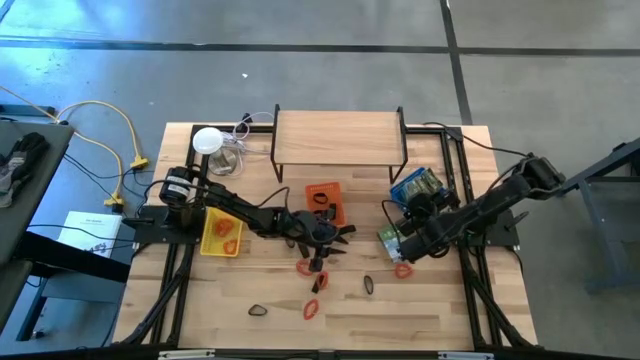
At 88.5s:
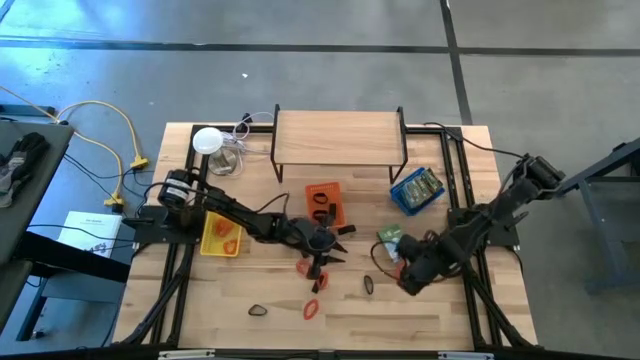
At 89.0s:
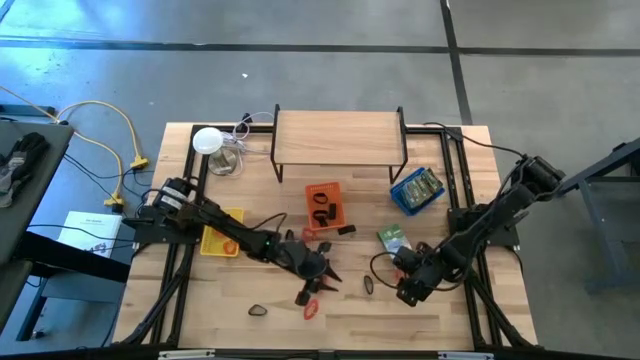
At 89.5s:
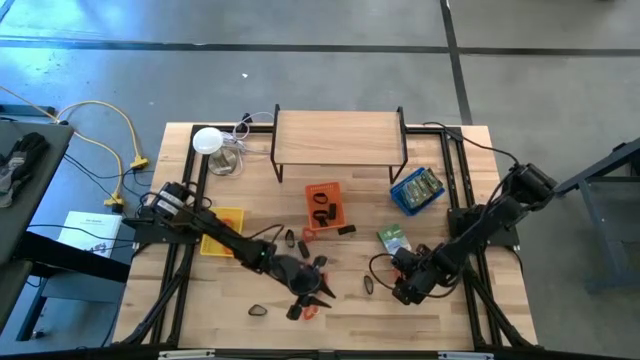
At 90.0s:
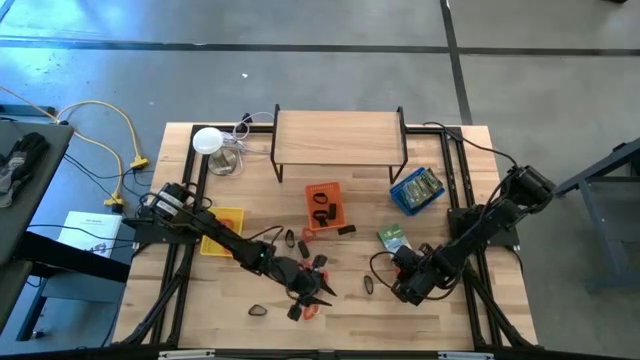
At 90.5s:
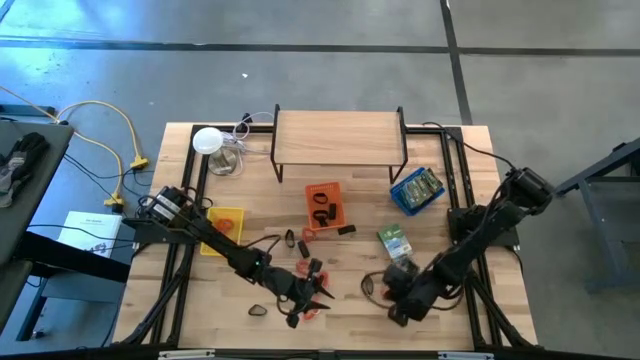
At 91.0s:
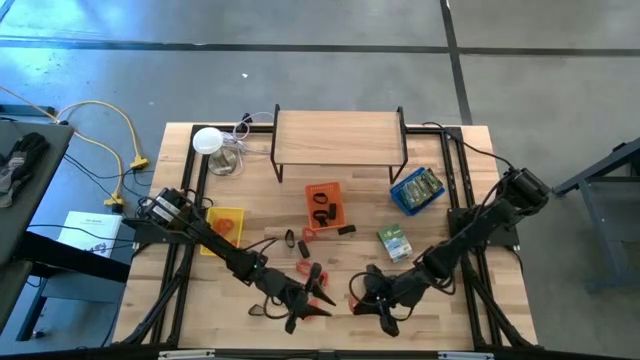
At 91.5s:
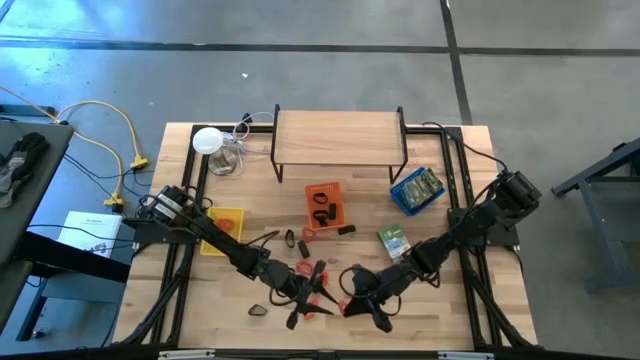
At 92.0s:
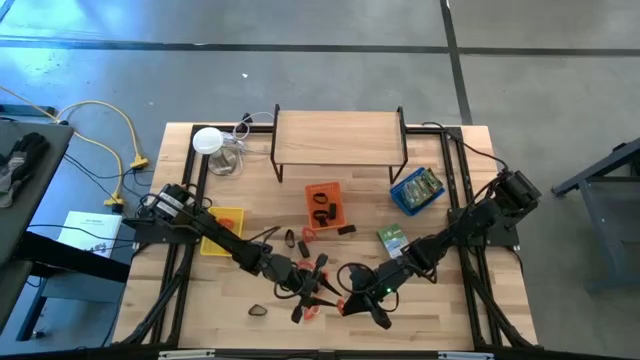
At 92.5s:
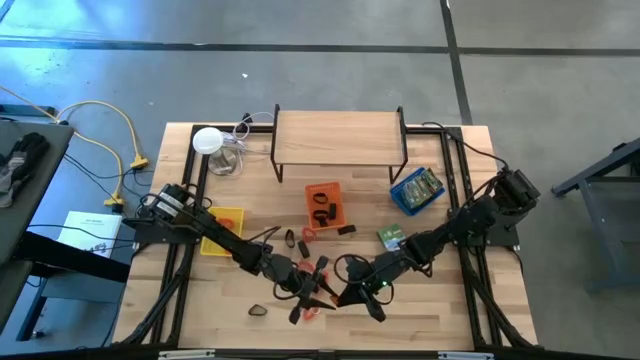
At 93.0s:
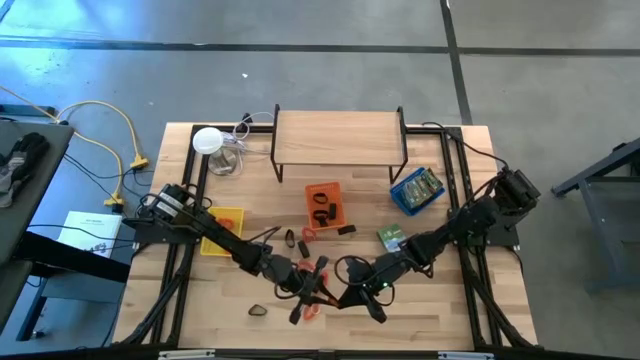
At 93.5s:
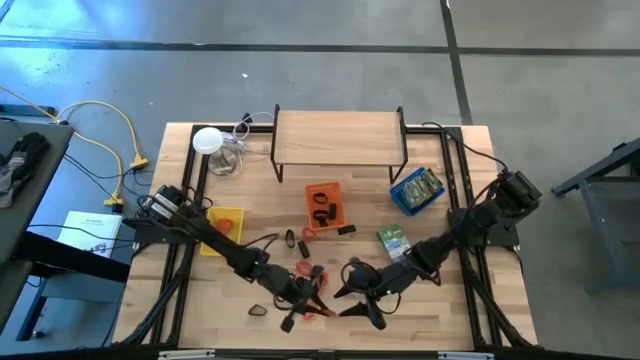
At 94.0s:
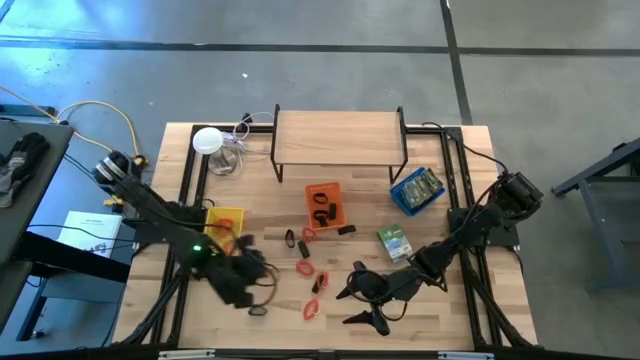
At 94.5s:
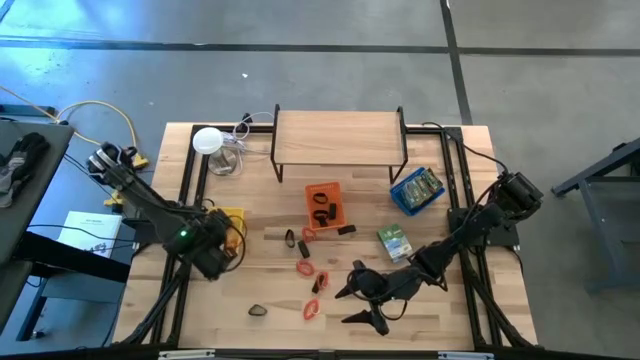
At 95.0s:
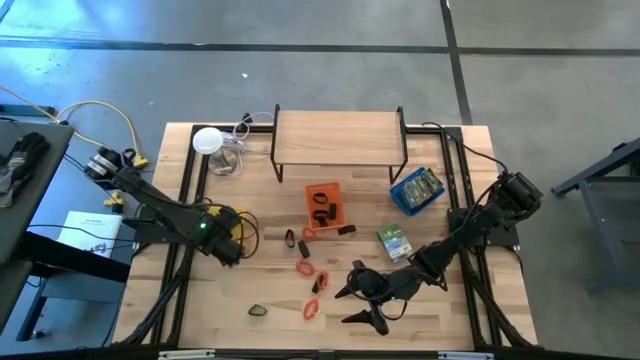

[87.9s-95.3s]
Task: Pick & Place Office Desk Supplies
Put the orange spring key chain into the yellow bin

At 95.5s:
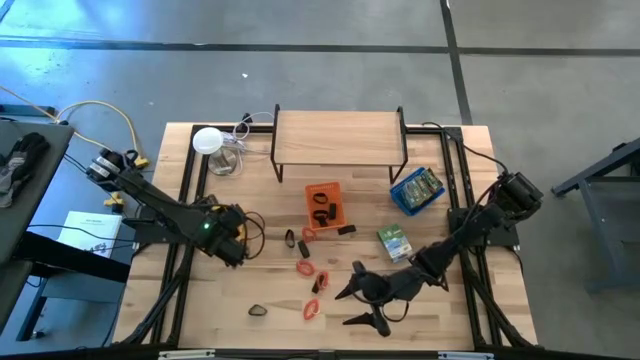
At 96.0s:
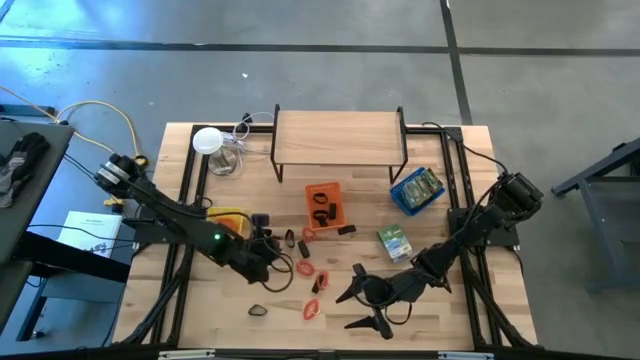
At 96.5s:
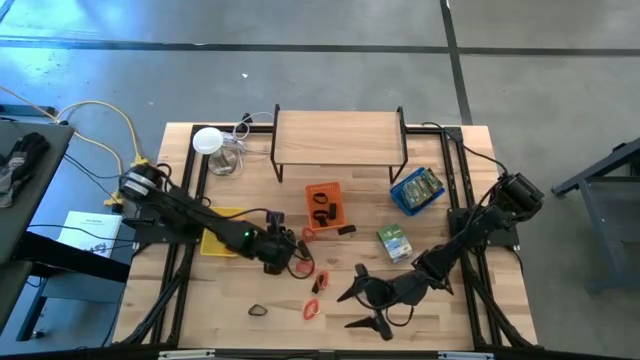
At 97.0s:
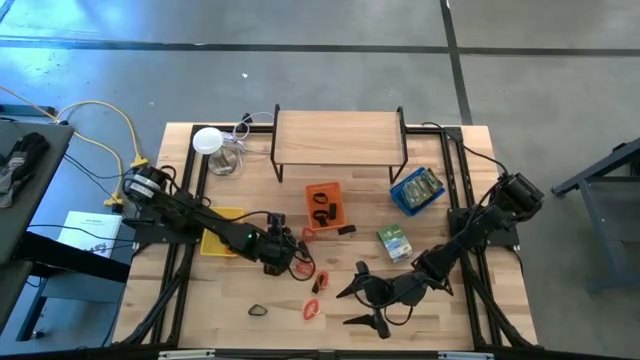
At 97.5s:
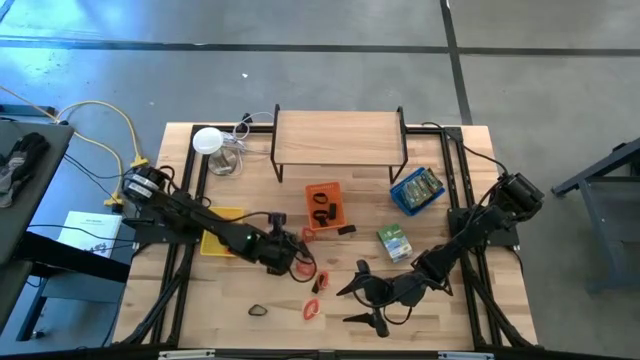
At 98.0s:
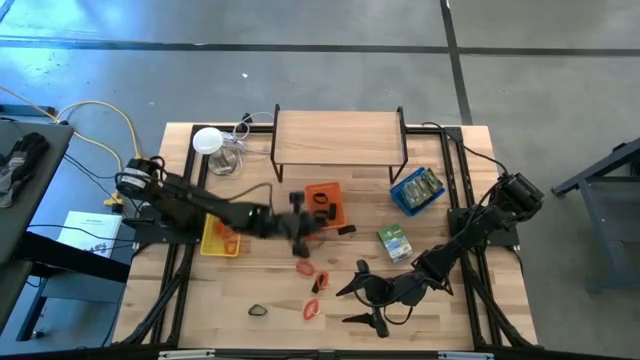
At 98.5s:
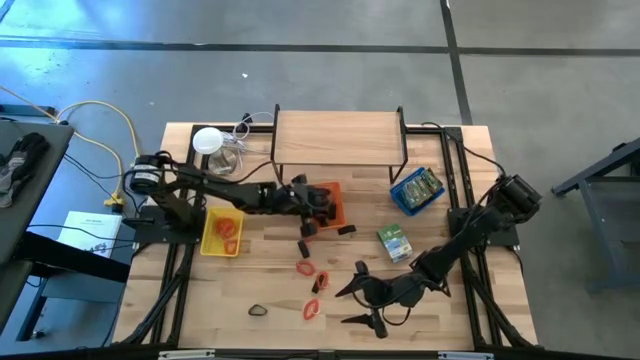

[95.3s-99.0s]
Put the black rubber band into the orange bin

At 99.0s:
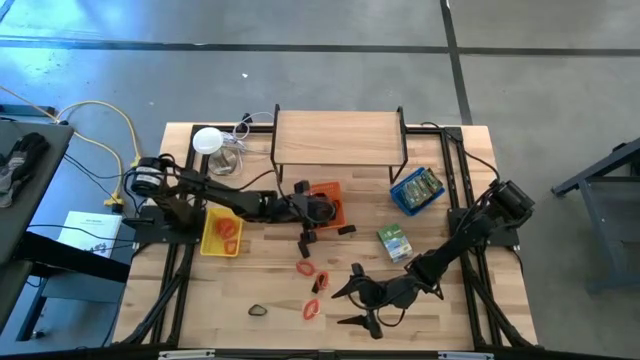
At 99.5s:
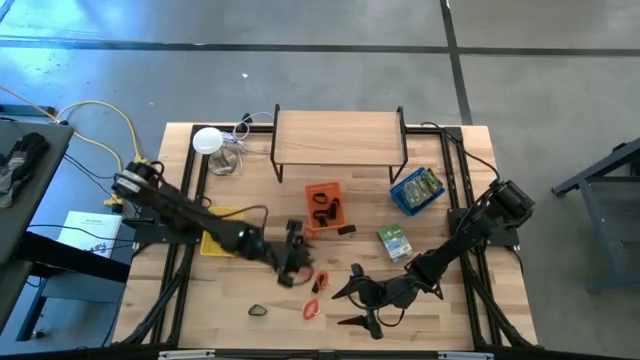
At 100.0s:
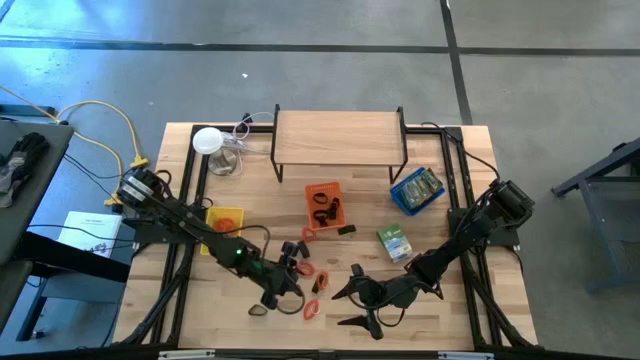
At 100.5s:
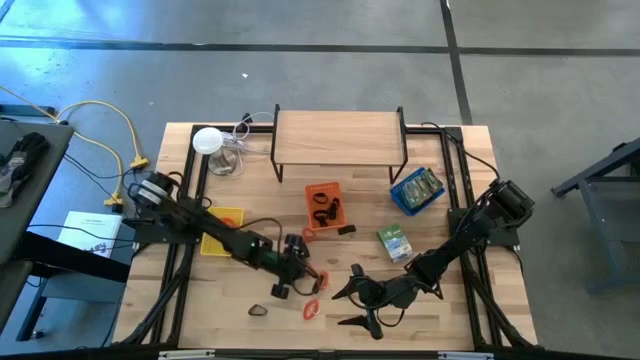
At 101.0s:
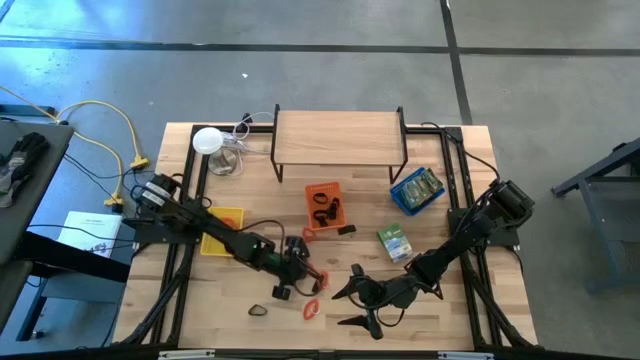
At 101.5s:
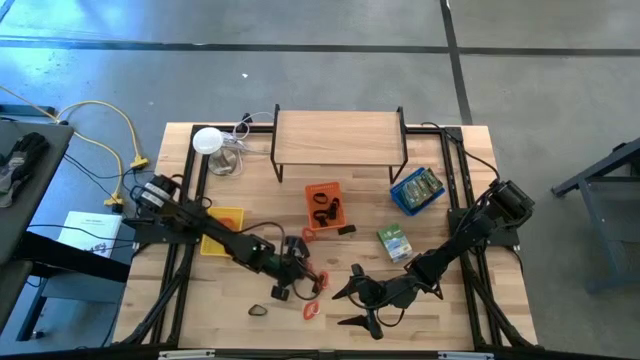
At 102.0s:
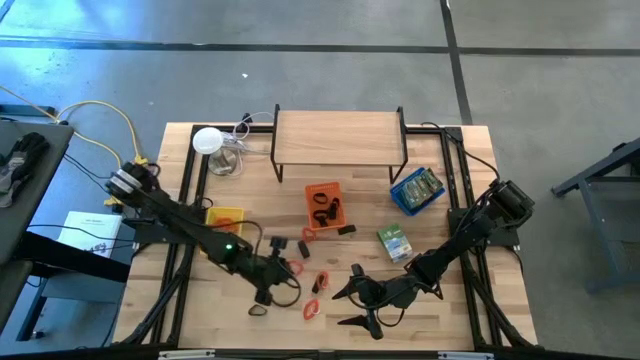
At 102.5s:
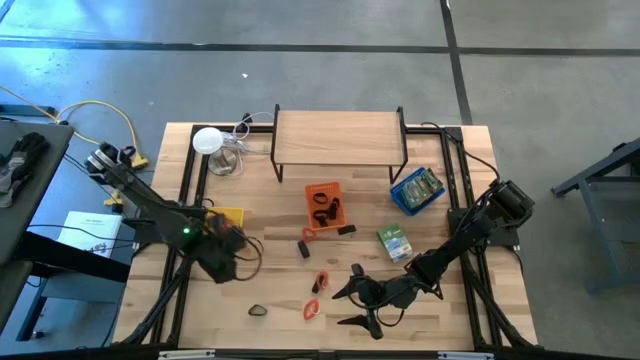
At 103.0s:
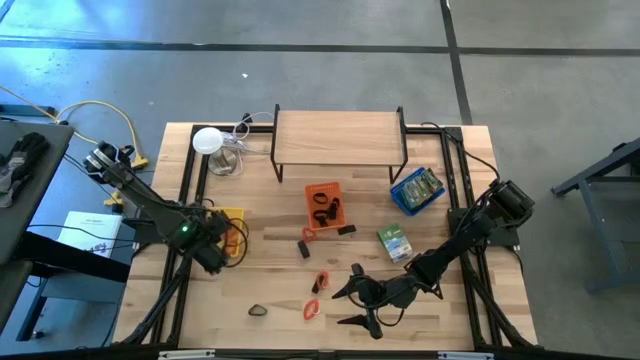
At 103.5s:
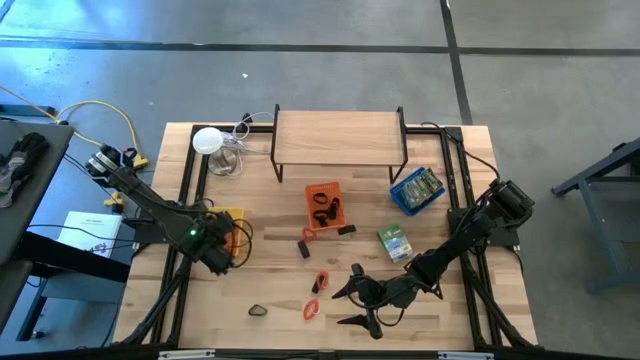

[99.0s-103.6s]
Put the orange spring key chain into the yellow bin

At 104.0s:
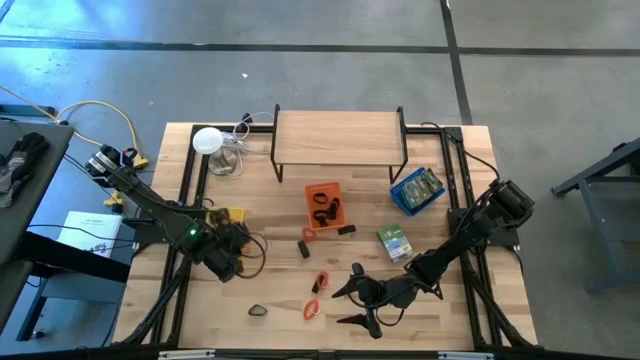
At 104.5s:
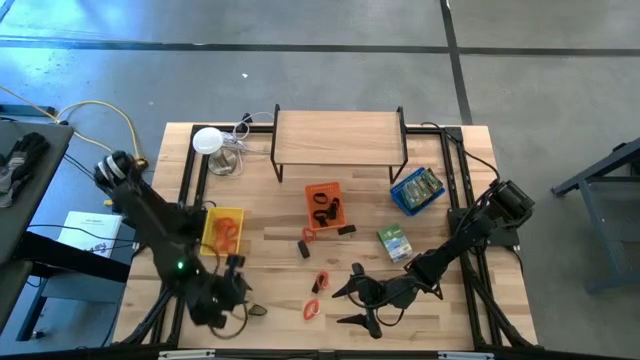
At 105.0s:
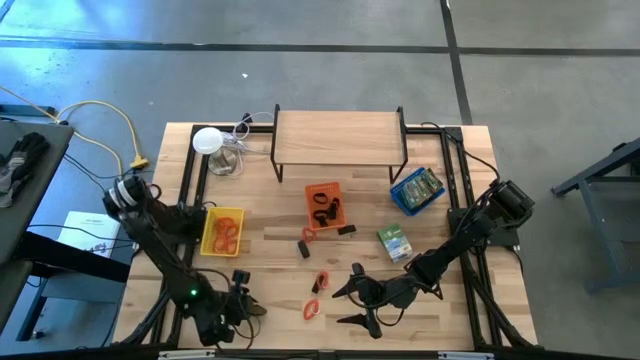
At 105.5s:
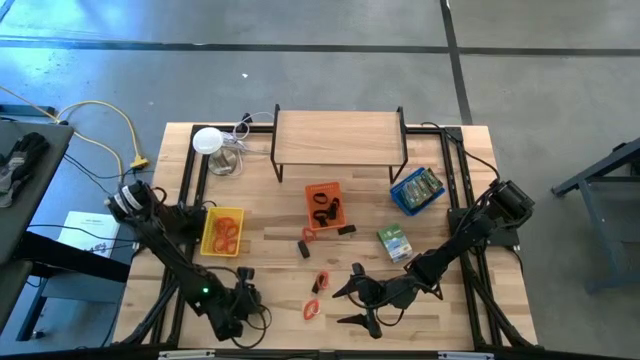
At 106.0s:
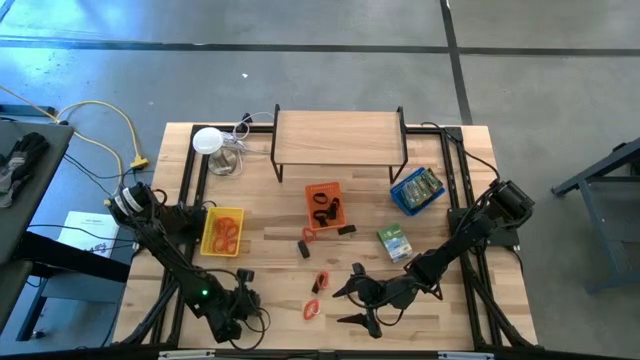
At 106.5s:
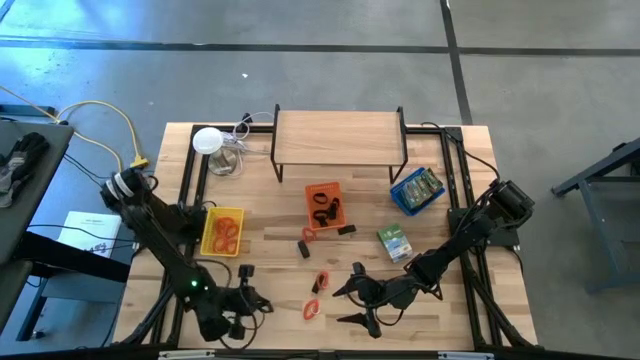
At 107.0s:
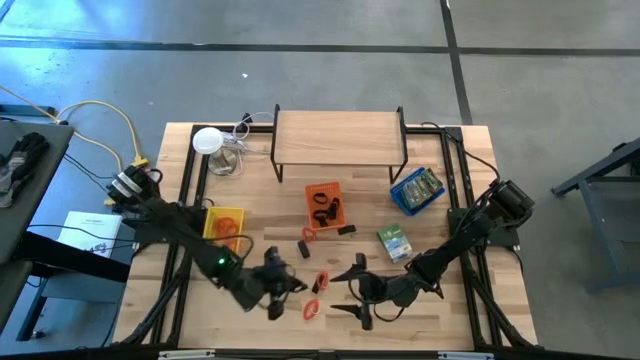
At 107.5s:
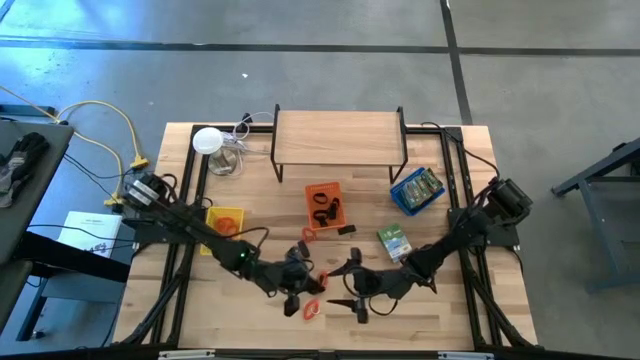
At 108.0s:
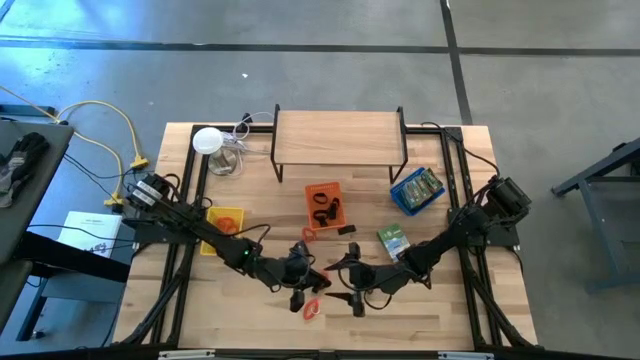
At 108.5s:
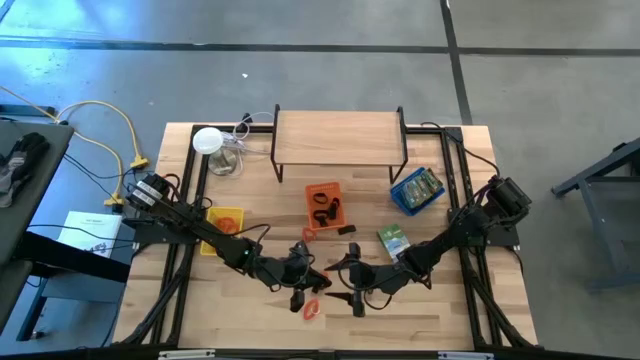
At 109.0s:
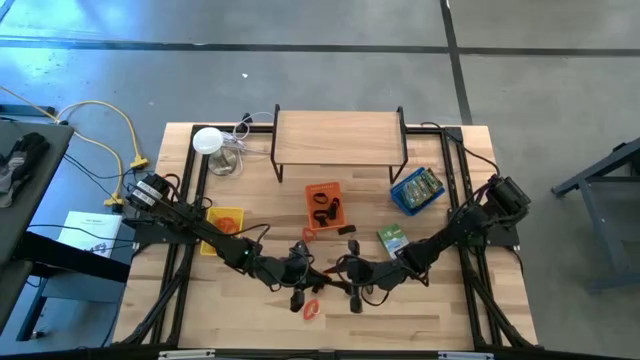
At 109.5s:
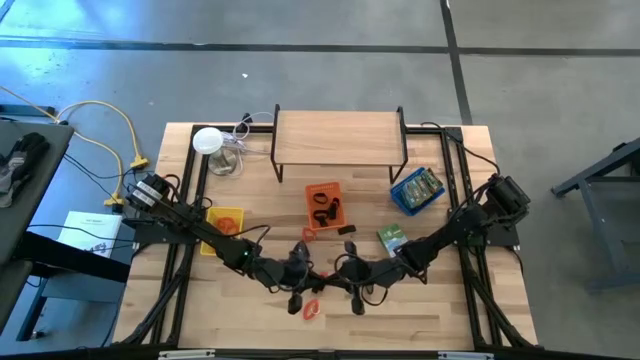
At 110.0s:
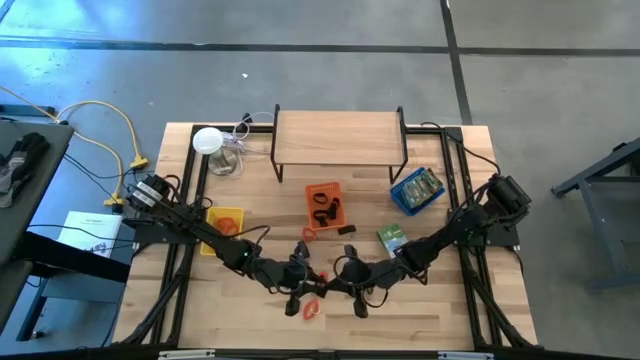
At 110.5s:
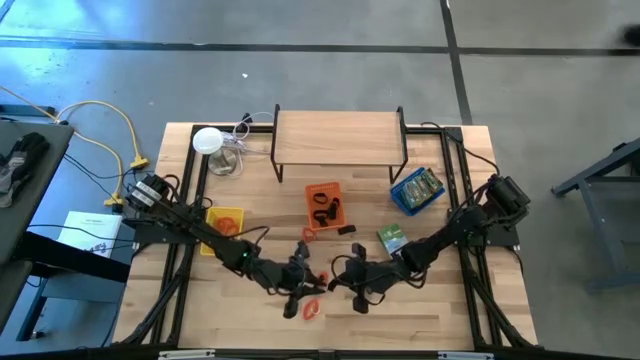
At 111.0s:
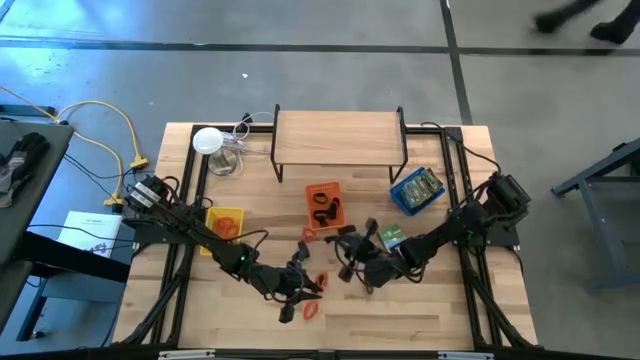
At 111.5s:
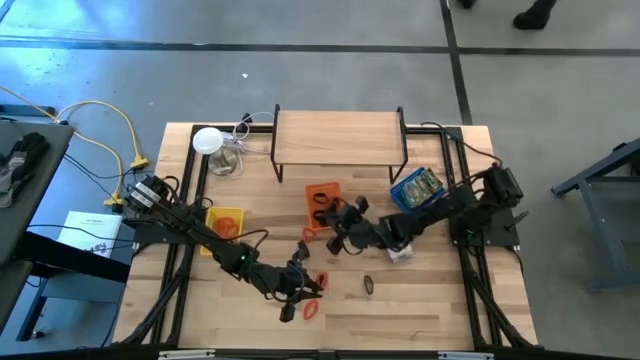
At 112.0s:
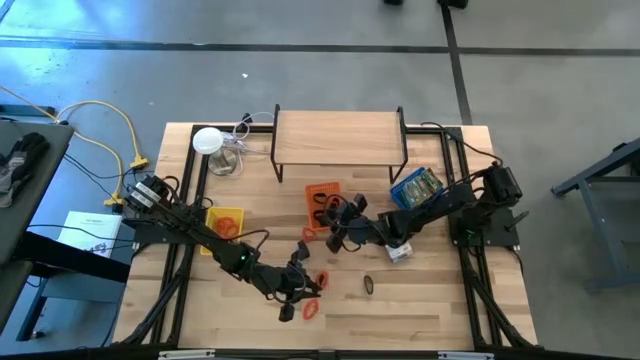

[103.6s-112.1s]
Put the black rubber band into the orange bin
